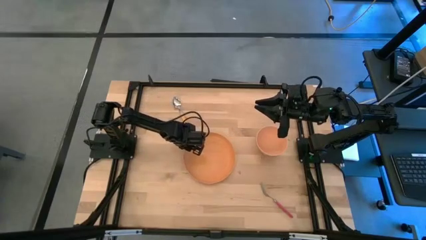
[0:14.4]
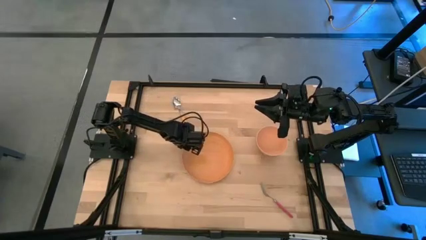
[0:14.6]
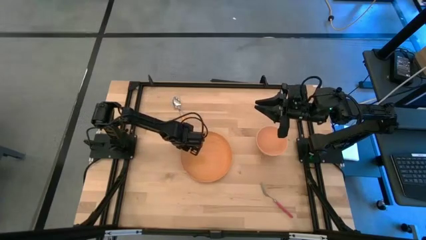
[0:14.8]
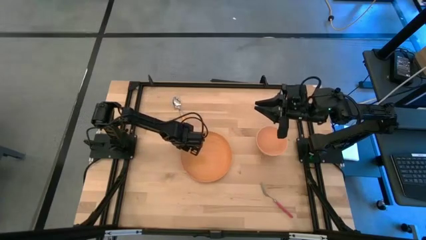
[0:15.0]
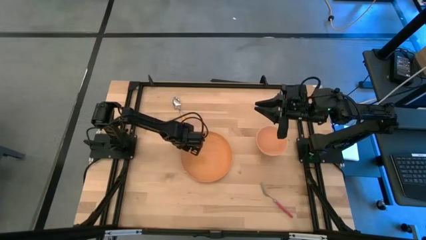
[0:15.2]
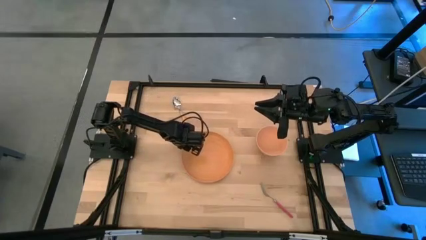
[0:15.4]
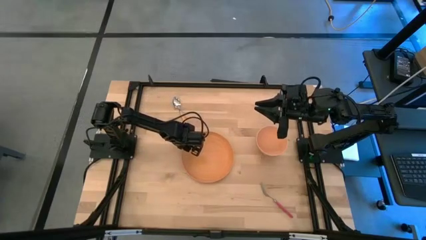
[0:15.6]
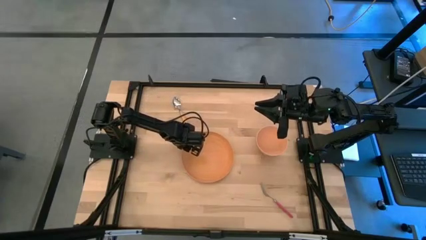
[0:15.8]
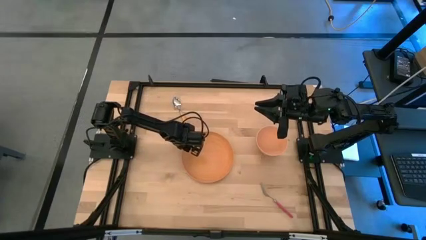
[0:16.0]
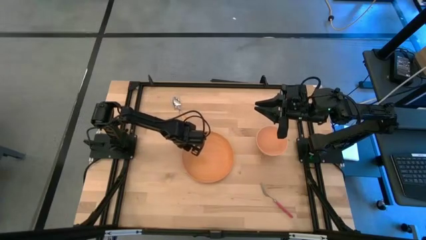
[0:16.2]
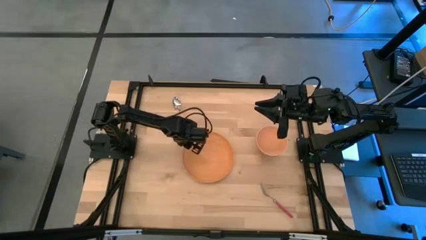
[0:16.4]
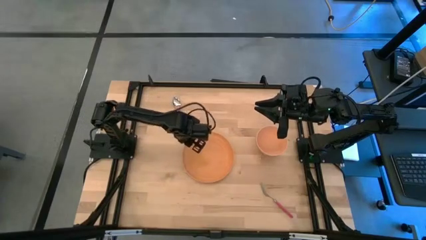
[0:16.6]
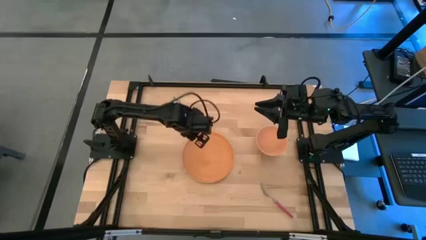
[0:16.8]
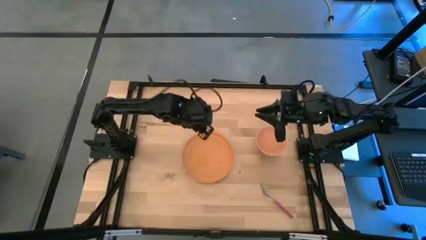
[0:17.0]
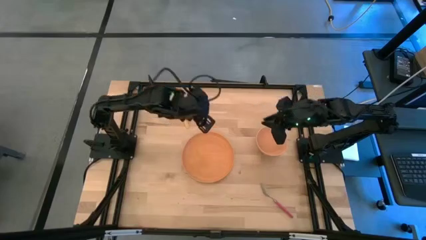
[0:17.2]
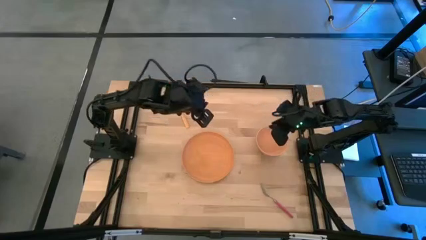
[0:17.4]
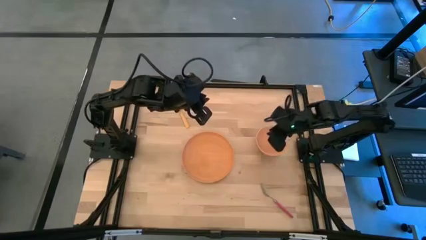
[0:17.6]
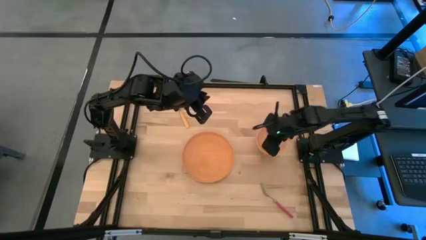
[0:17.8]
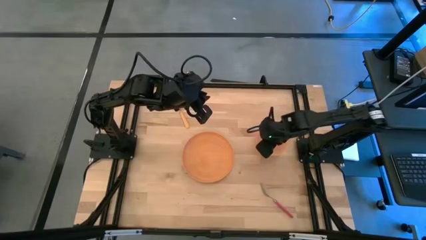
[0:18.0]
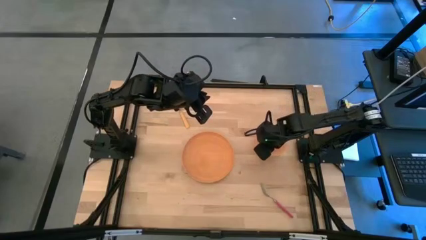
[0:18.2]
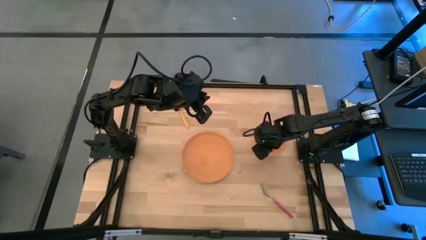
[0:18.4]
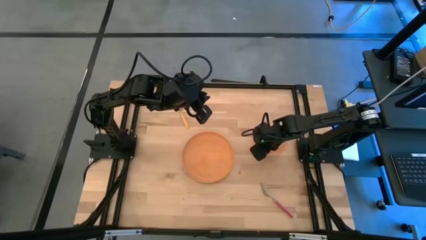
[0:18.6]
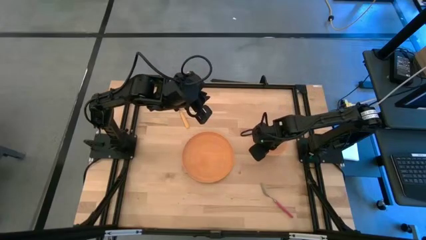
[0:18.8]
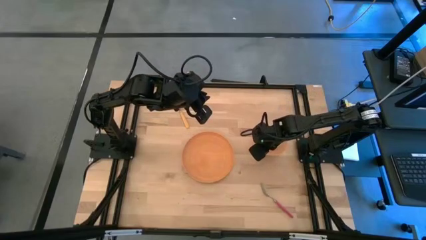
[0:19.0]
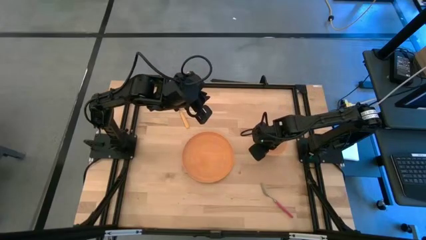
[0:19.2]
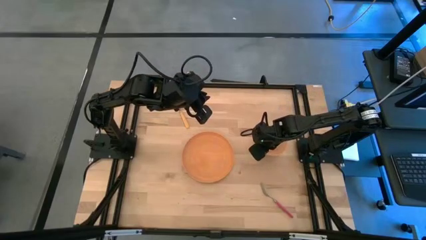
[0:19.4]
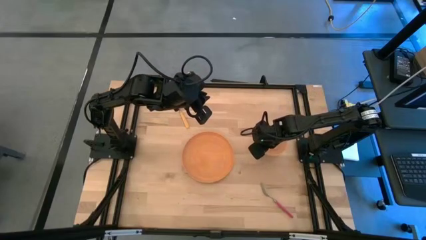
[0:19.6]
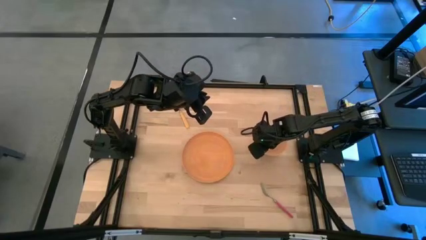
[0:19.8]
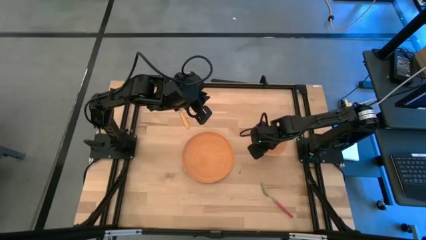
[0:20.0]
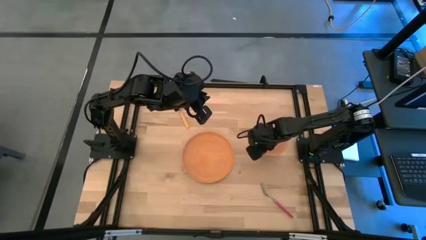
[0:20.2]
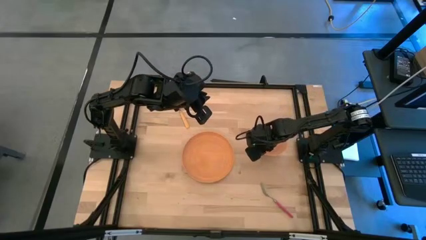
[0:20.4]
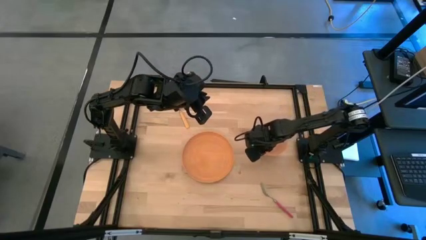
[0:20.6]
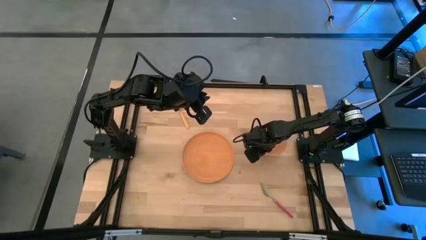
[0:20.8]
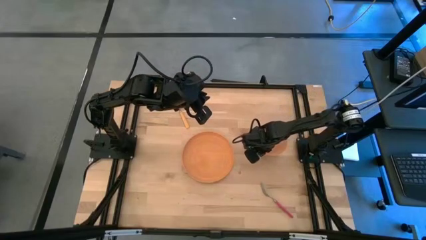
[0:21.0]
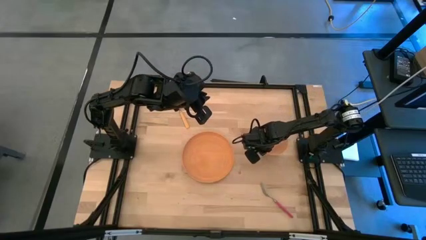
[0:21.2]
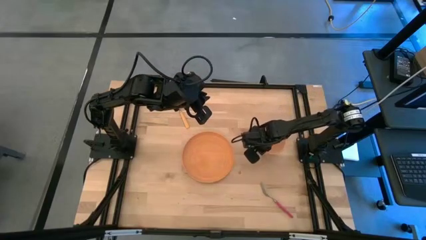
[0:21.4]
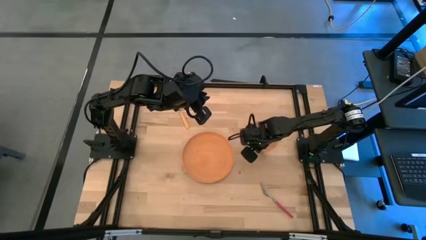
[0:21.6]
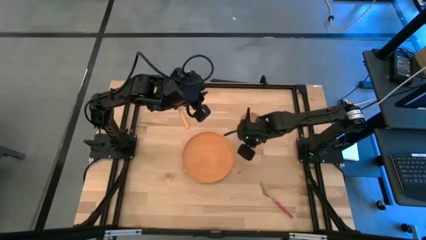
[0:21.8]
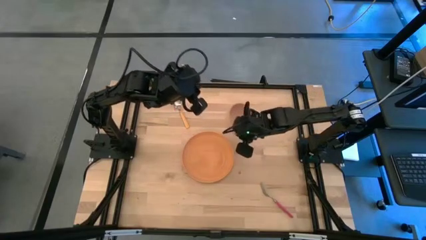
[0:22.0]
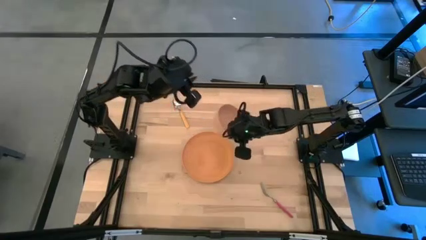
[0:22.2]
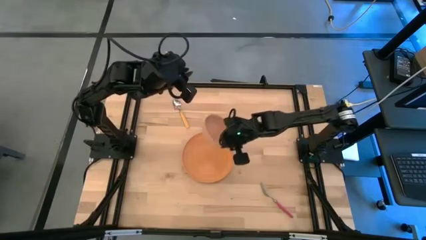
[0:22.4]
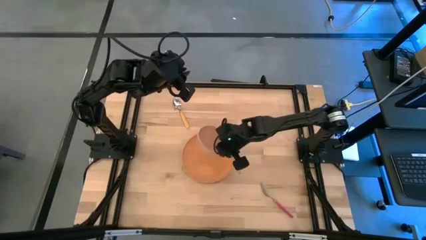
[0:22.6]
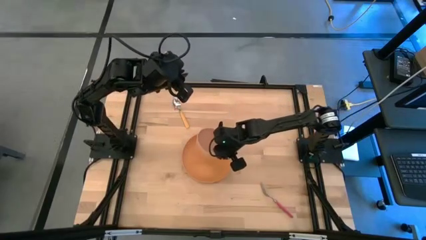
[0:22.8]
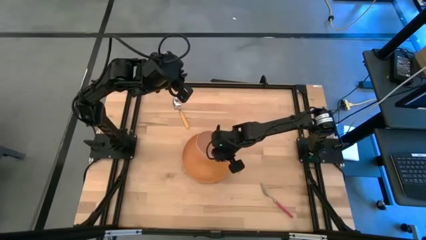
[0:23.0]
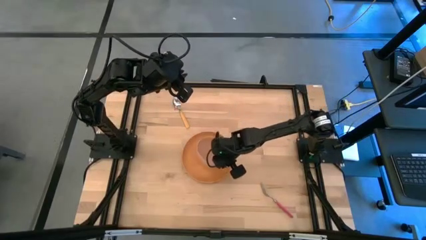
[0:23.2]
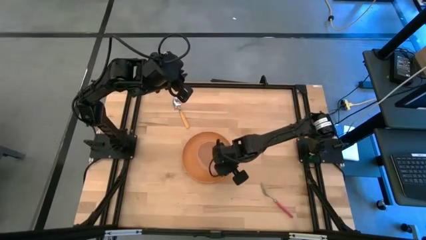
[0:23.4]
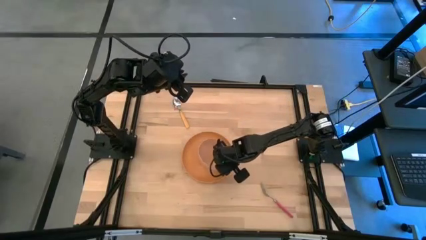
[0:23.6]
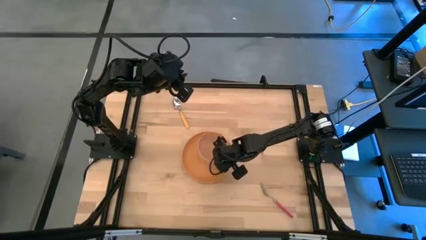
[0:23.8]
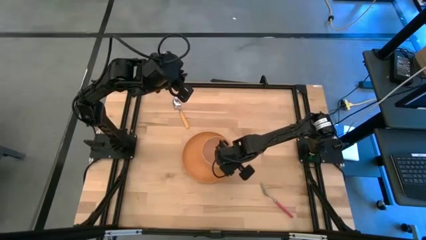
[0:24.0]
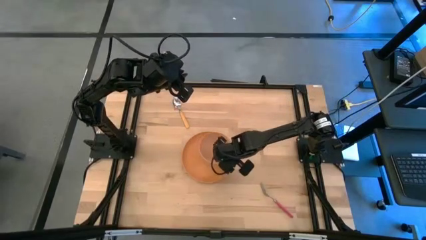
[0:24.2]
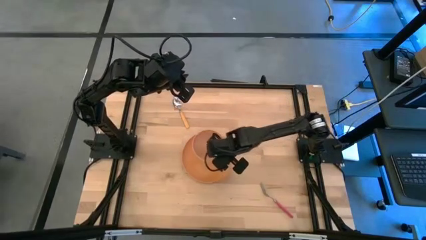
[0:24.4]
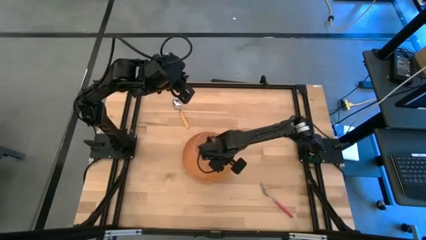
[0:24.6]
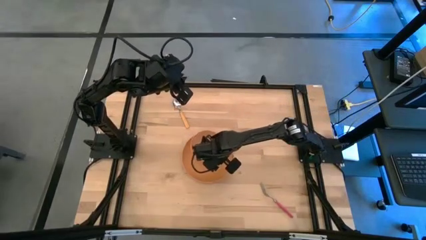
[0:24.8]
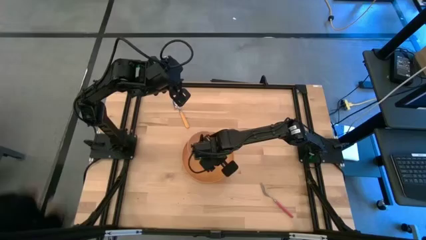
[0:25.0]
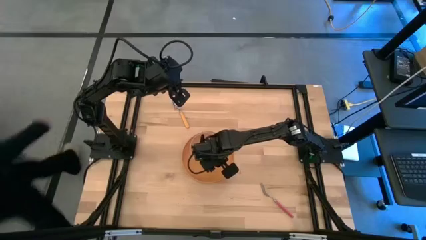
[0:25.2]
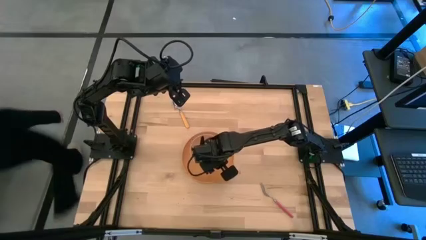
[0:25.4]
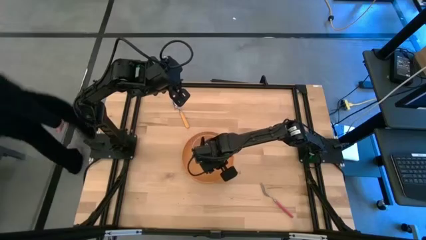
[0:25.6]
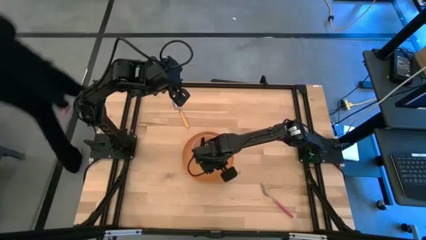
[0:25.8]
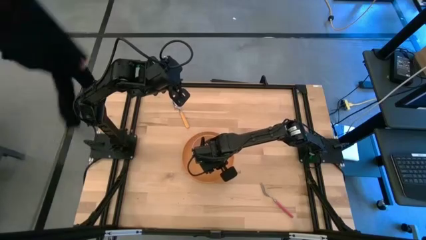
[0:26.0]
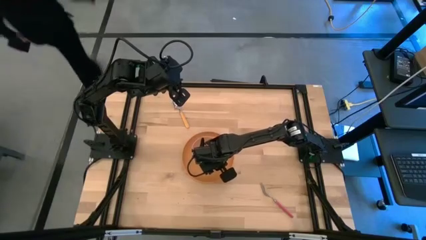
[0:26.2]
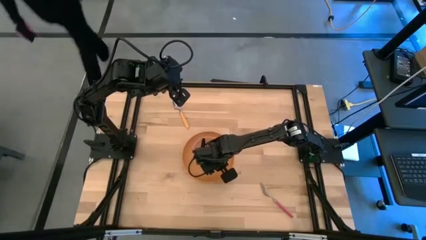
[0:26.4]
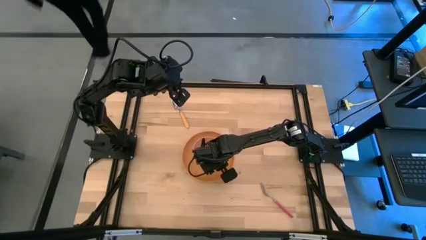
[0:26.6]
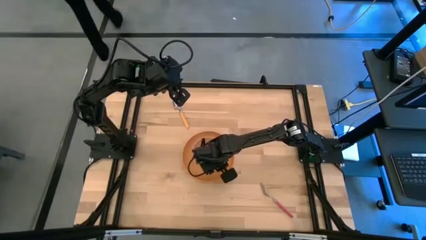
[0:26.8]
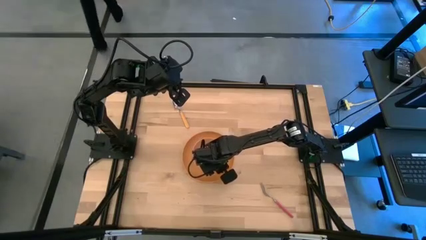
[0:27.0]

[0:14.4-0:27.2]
Task: Set table place
Put the light pink bowl on the orange plate

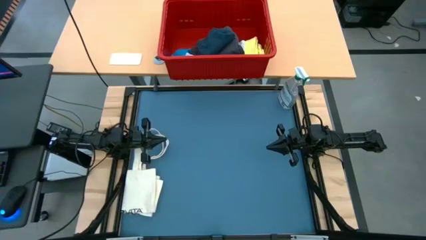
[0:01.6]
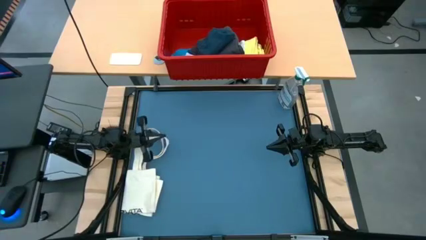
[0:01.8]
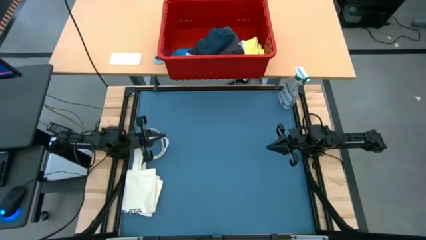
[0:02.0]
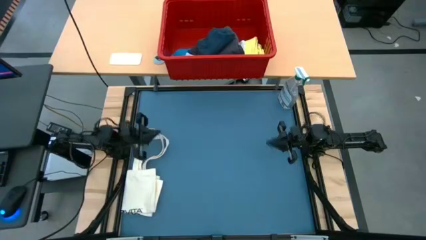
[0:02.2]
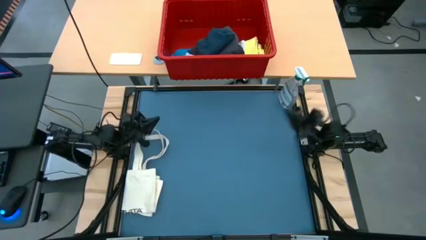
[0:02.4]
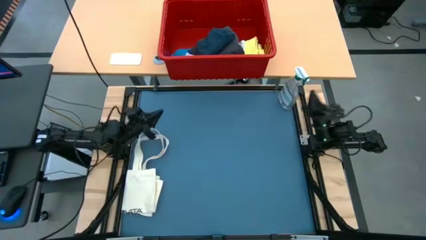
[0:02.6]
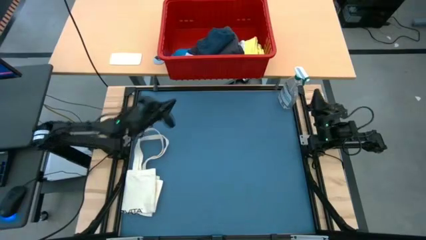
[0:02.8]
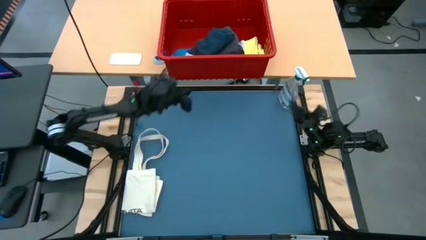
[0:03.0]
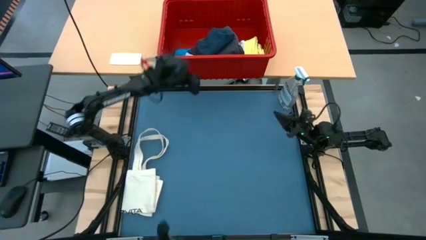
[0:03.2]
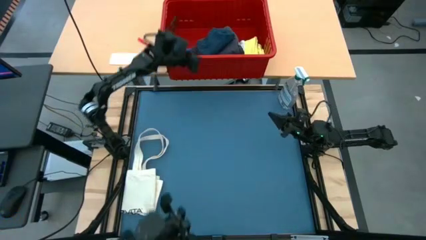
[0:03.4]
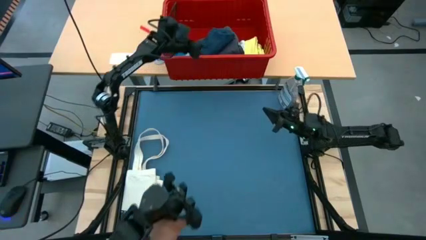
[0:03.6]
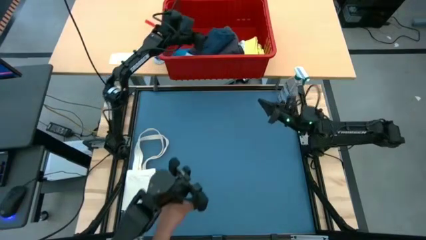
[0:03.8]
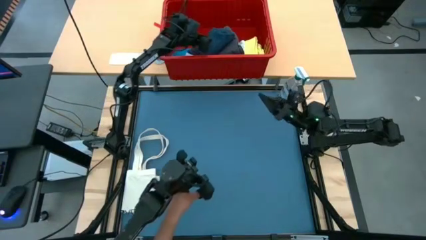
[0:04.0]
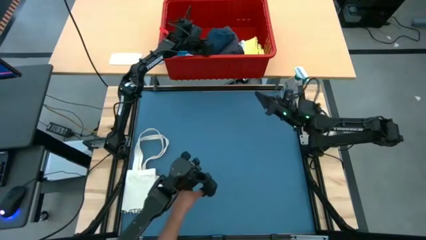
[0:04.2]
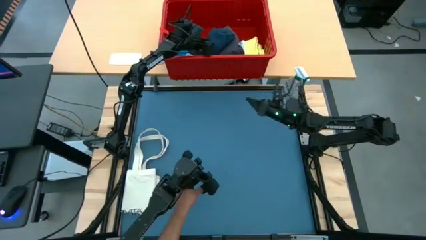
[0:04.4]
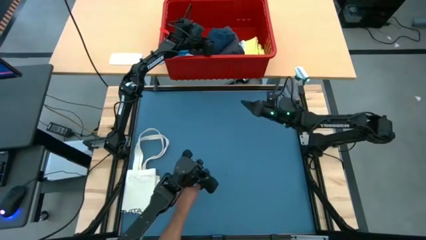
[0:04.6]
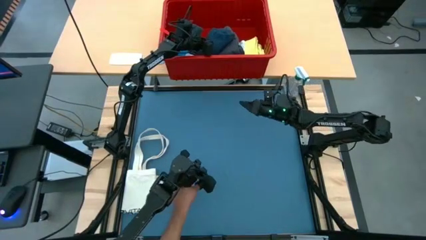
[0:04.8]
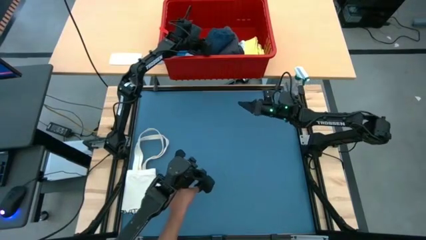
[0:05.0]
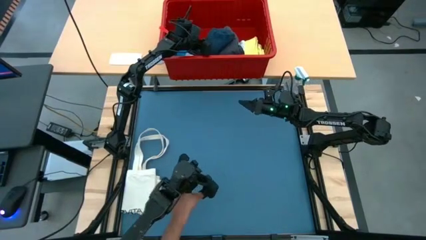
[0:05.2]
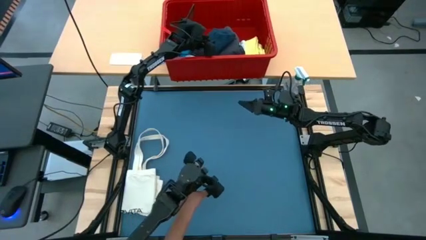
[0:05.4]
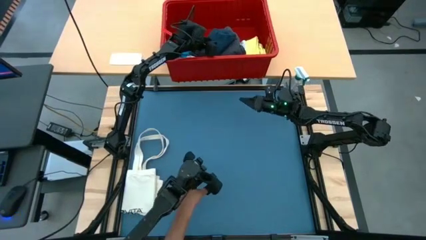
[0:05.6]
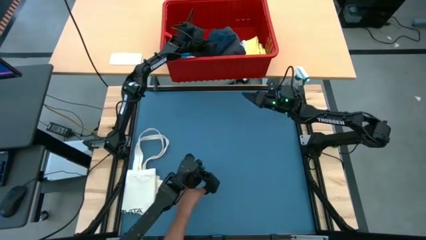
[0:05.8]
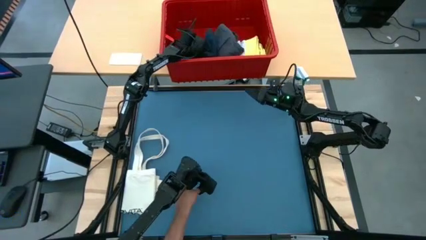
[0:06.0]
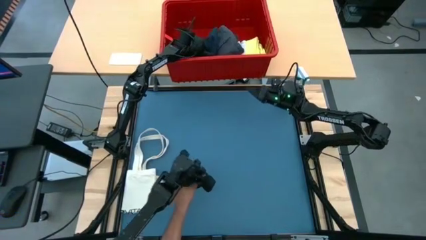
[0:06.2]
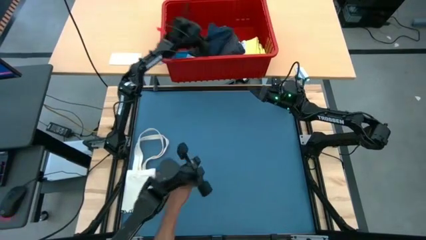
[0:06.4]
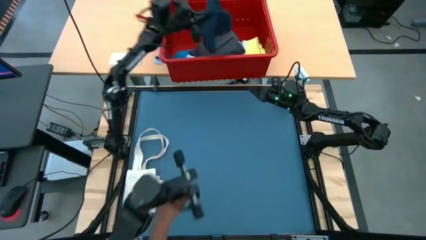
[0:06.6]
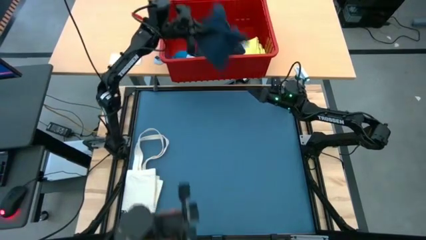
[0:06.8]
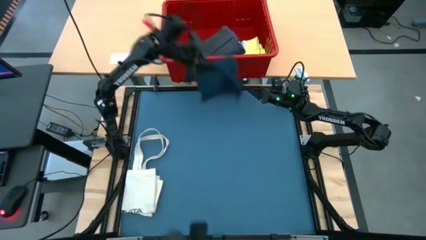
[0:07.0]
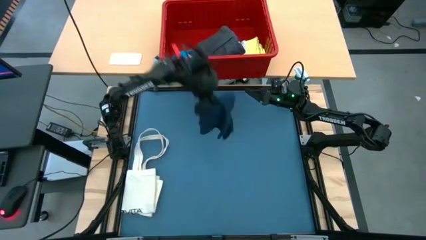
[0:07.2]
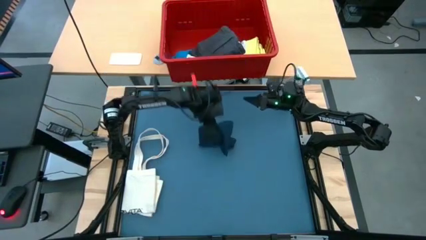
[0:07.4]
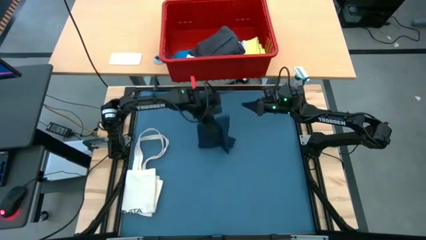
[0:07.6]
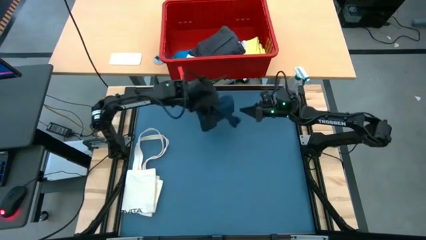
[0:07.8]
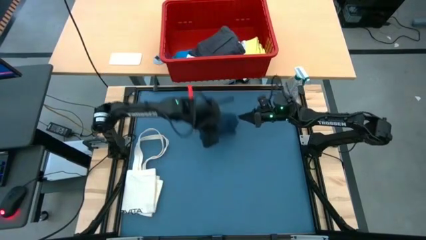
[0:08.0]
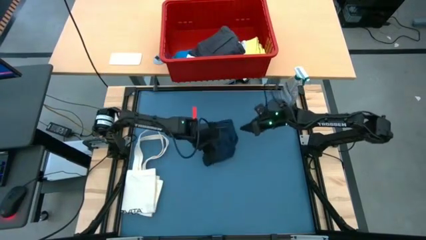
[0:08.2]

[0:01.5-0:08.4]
Task: Fold Laundry from Bin
Remove the dark blue shorts from the bin
